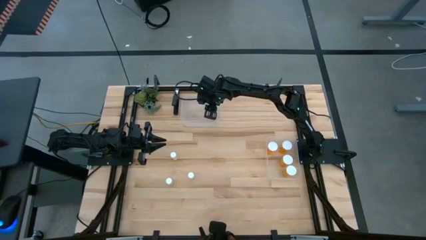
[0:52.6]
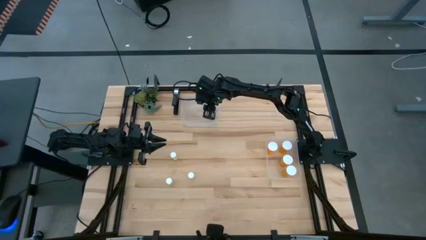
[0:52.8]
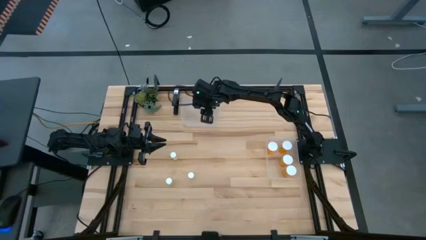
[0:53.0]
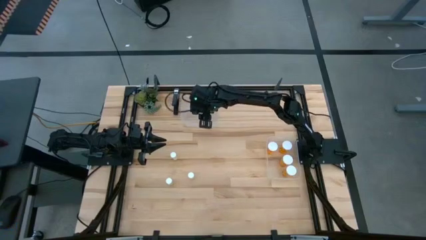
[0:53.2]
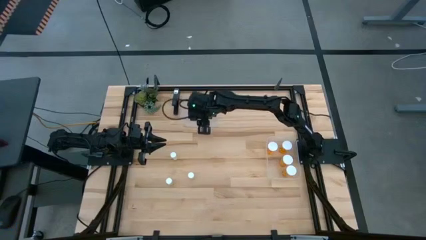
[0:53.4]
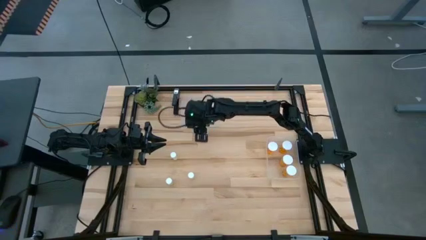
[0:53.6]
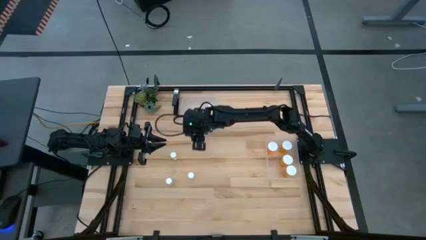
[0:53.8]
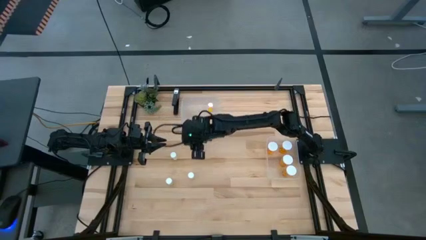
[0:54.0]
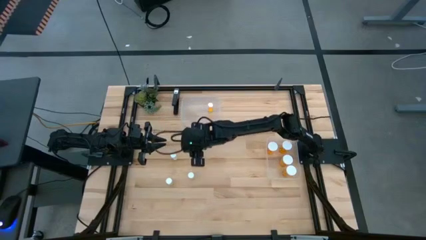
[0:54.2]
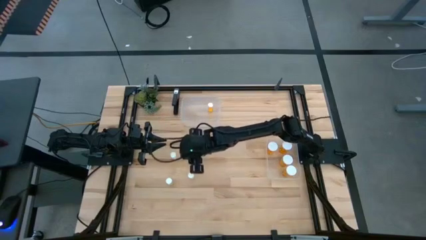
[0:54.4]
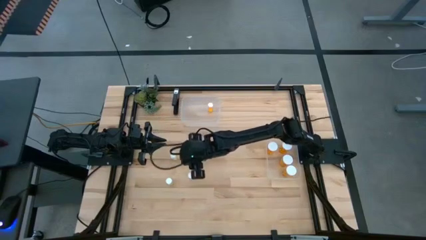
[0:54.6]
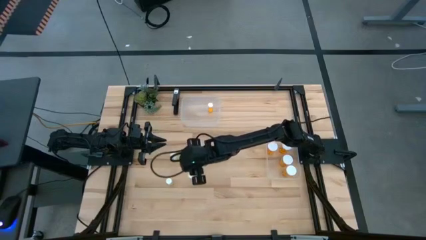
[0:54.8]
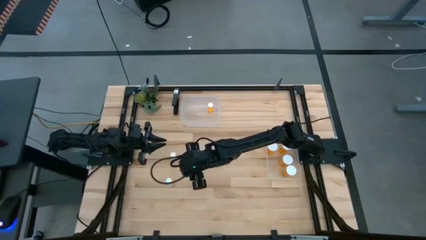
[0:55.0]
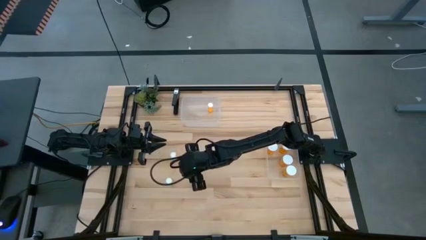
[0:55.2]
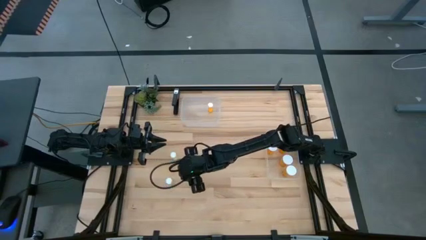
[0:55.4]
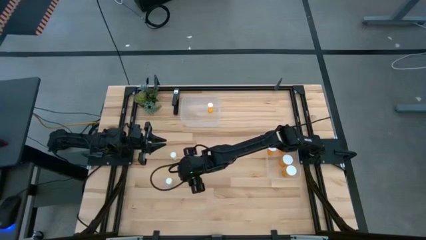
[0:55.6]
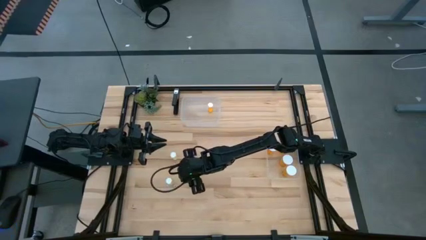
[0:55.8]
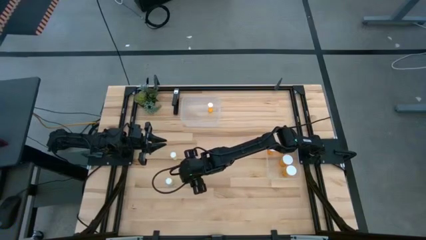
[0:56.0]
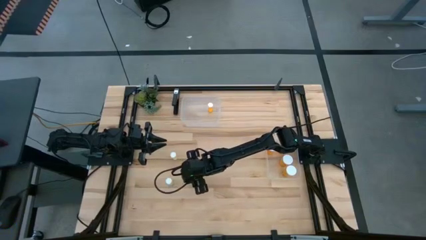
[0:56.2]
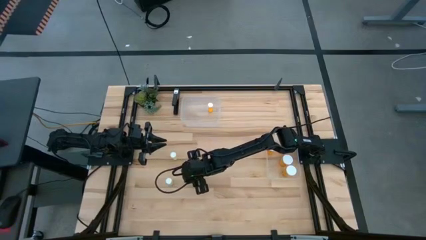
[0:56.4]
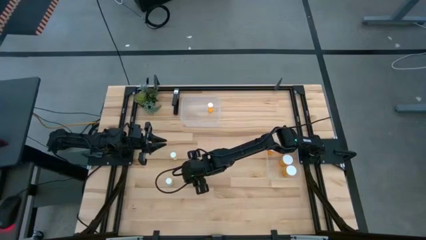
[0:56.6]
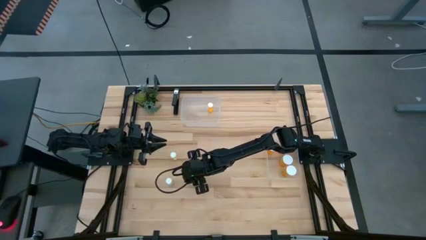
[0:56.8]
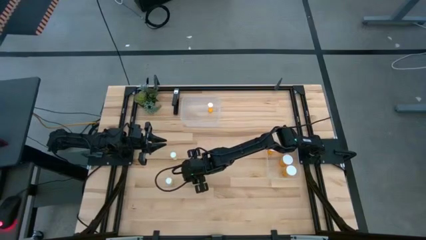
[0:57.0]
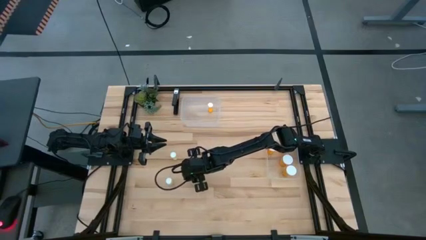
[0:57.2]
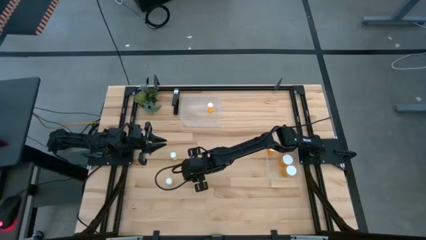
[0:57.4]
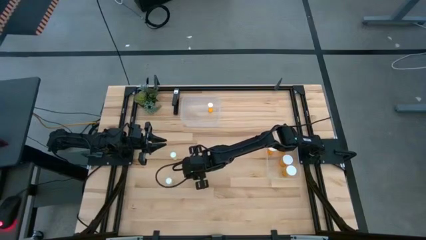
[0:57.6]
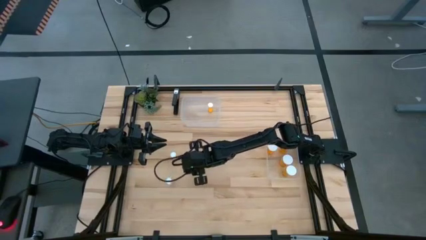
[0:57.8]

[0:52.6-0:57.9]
Task: Pick and place medicine bottles into bin by pill shape (circle, oval)
Put the small yellow pill bottle into the top transparent bin

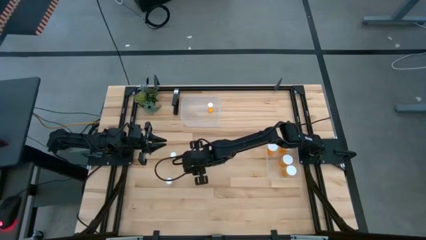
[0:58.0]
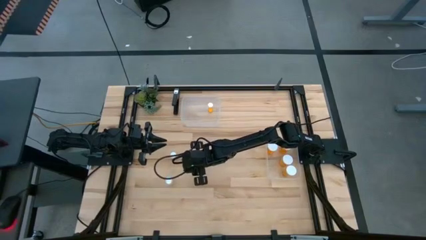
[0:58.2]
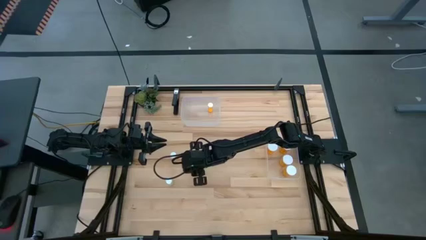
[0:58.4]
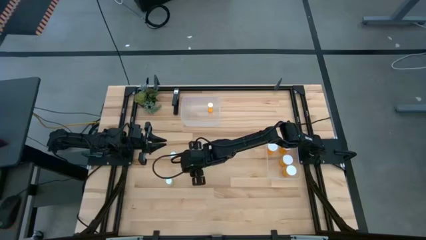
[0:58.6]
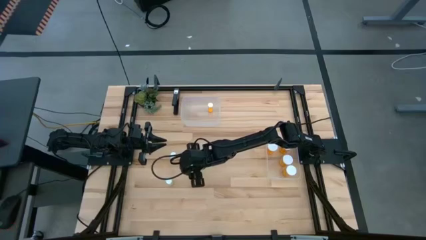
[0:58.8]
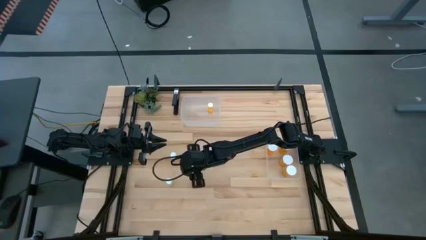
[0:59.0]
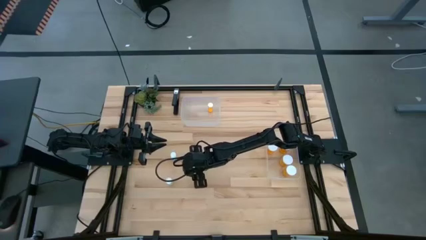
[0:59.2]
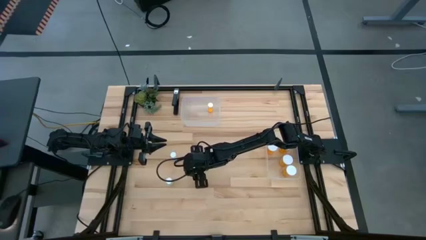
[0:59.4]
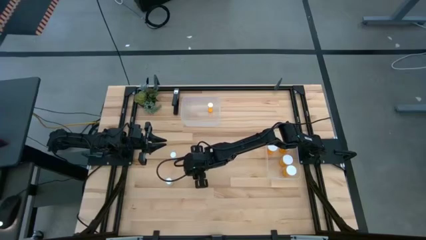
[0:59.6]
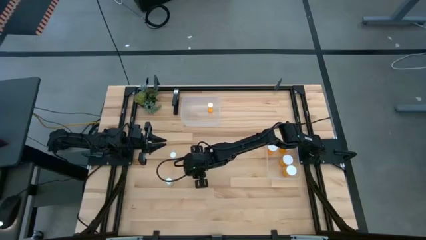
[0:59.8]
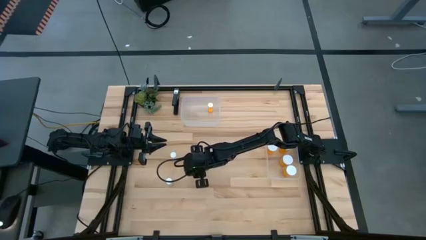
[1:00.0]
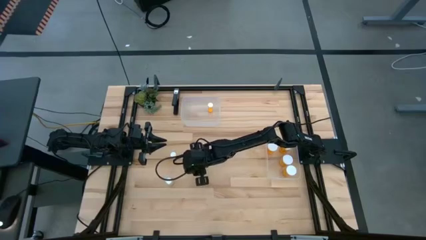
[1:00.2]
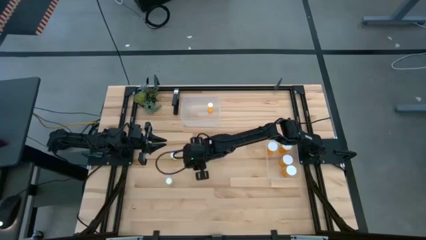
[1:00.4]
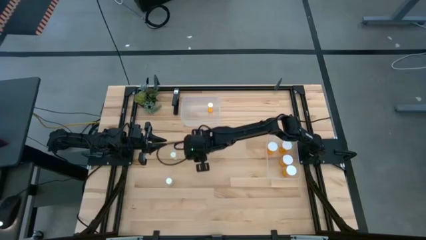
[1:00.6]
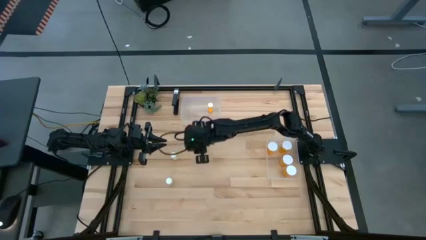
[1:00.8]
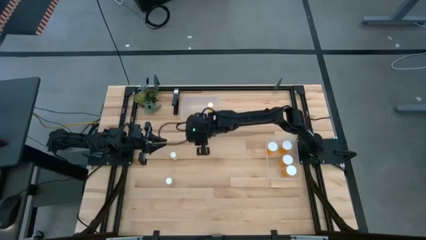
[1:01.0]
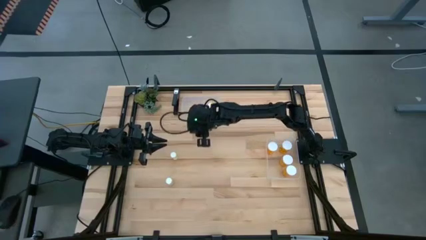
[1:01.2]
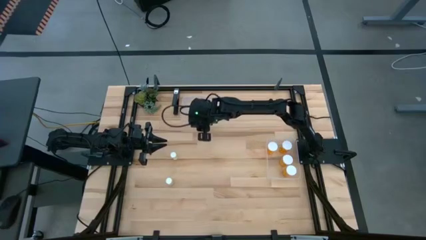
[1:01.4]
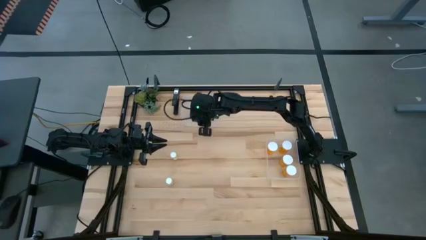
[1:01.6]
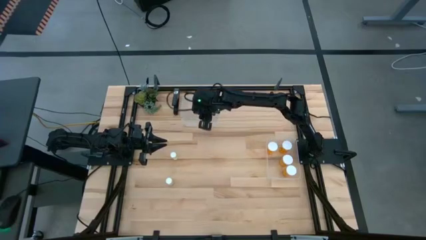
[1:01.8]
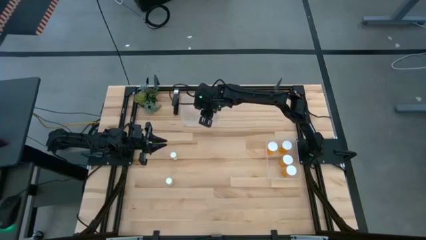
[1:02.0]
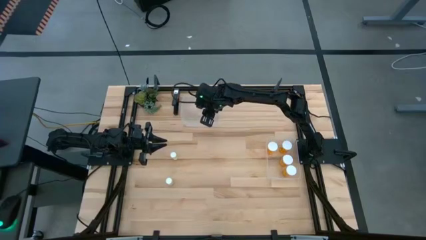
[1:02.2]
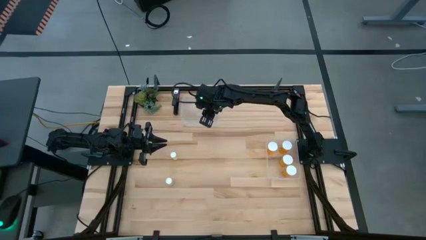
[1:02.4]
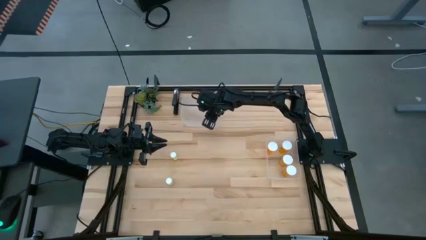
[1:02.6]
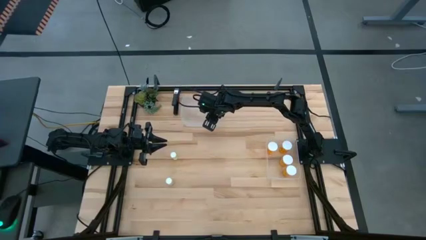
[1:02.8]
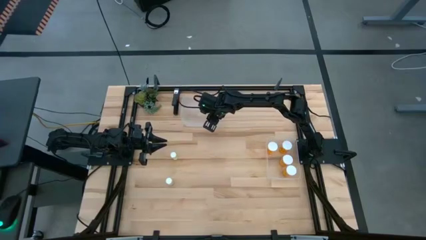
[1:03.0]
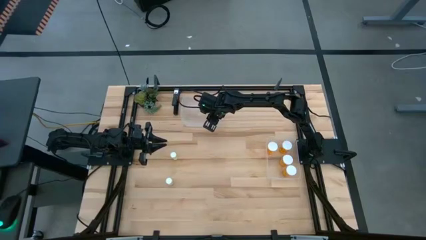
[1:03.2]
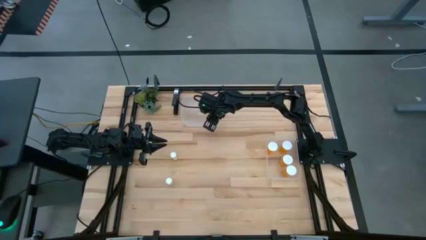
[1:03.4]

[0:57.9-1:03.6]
Put the small yellow pill bottle into the top transparent bin
